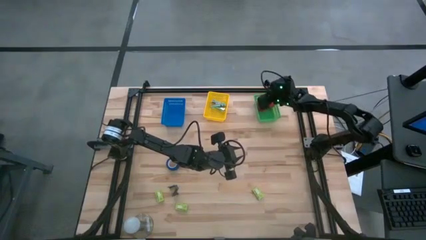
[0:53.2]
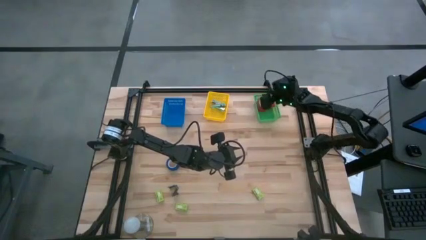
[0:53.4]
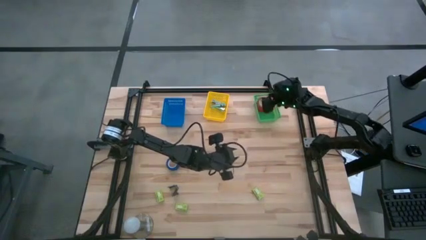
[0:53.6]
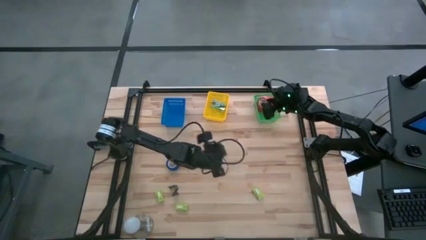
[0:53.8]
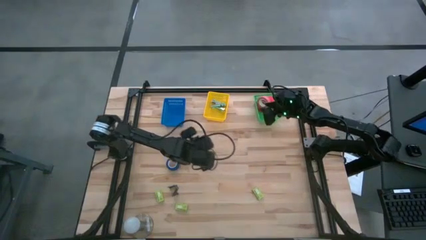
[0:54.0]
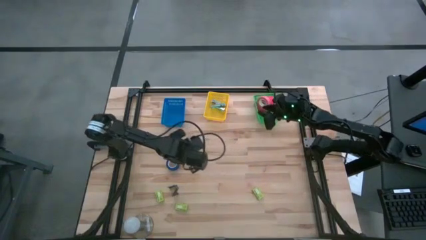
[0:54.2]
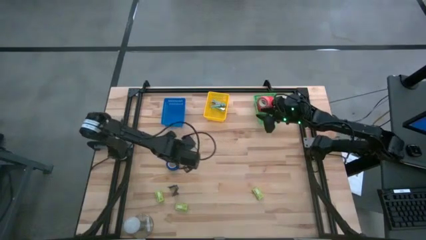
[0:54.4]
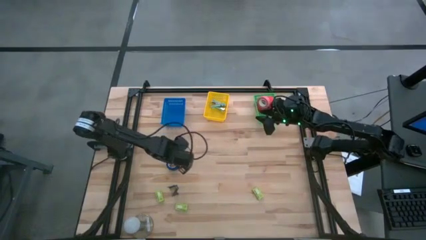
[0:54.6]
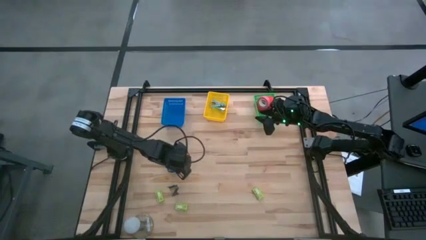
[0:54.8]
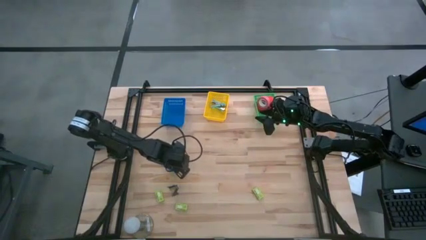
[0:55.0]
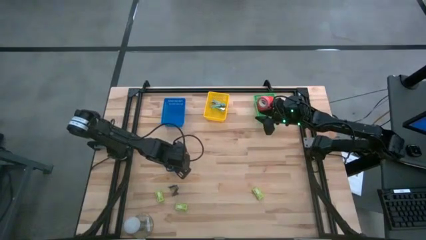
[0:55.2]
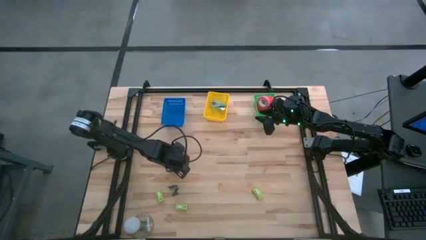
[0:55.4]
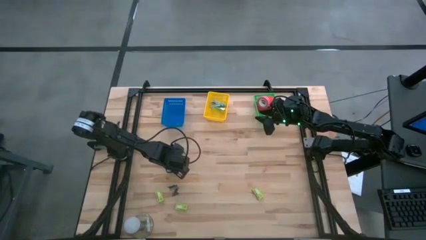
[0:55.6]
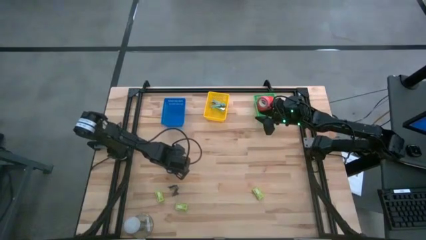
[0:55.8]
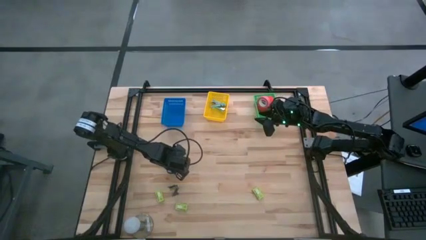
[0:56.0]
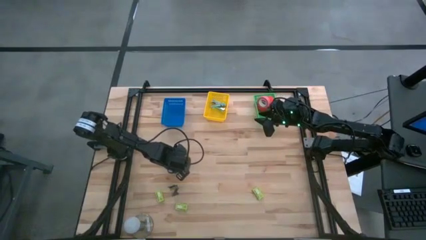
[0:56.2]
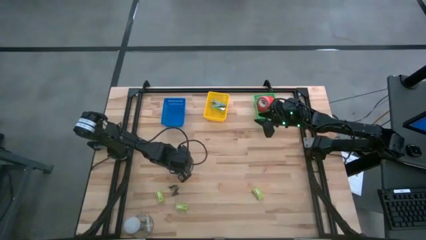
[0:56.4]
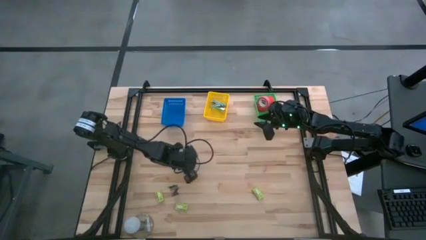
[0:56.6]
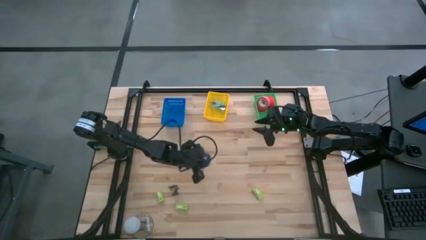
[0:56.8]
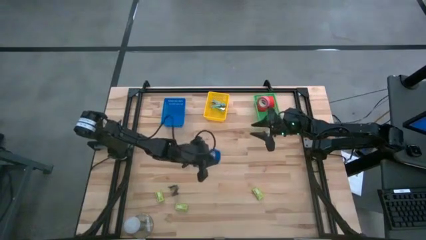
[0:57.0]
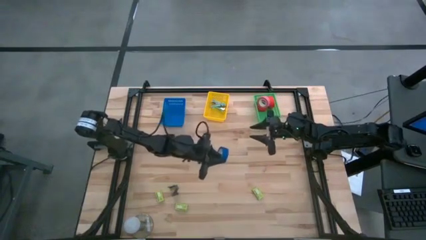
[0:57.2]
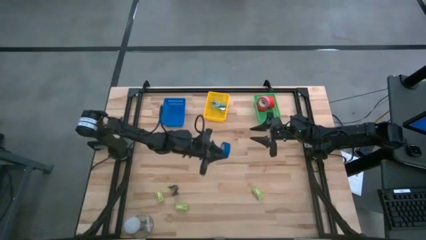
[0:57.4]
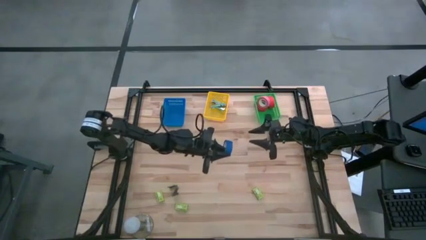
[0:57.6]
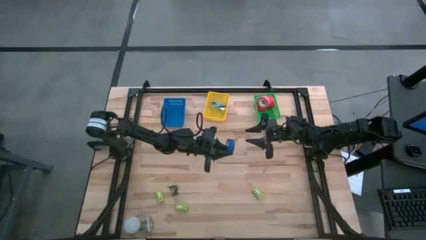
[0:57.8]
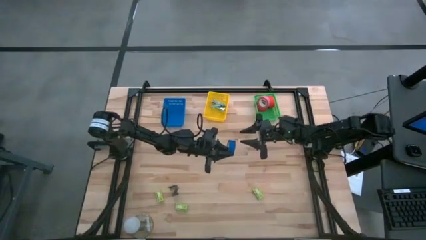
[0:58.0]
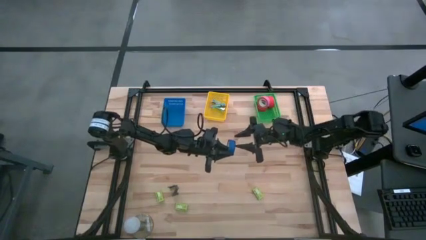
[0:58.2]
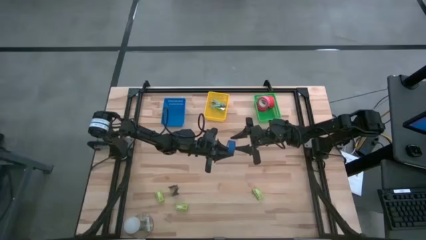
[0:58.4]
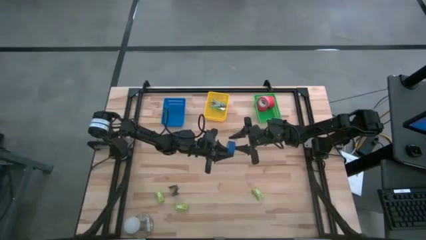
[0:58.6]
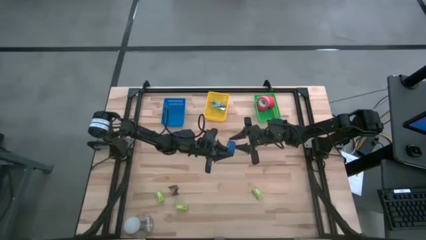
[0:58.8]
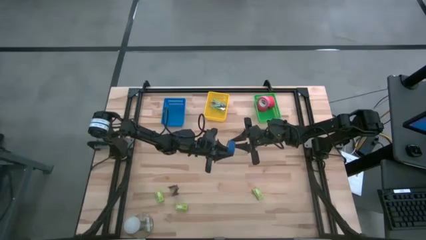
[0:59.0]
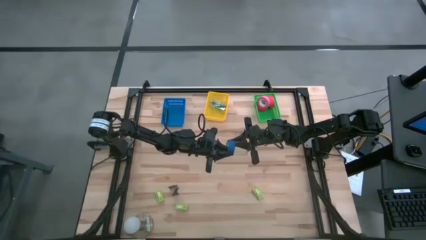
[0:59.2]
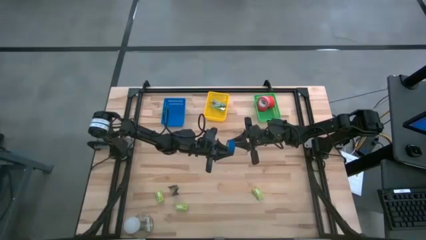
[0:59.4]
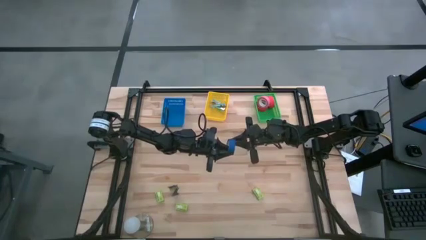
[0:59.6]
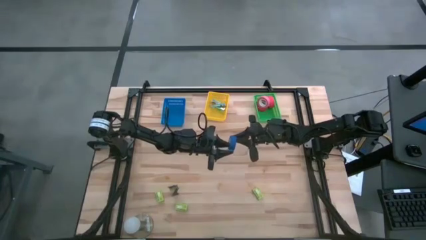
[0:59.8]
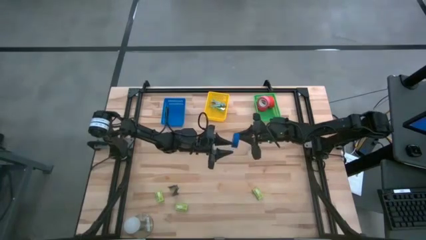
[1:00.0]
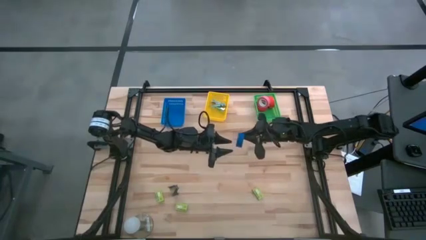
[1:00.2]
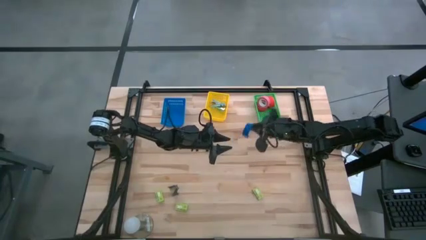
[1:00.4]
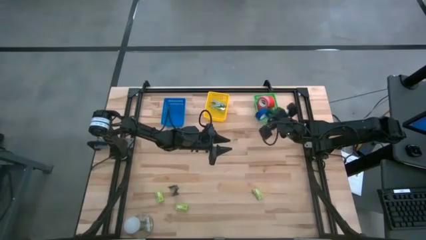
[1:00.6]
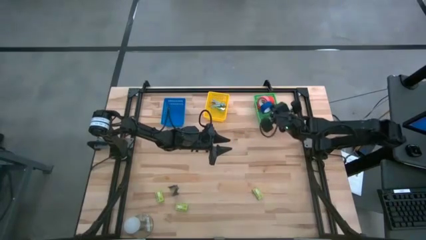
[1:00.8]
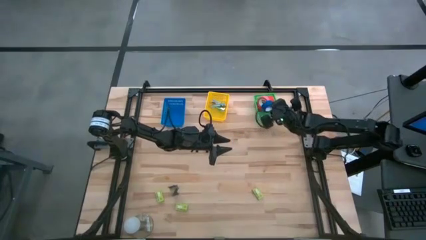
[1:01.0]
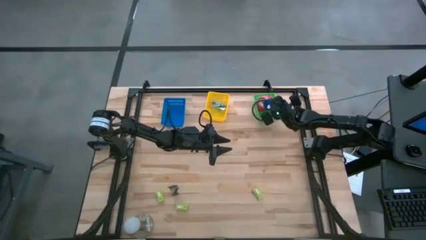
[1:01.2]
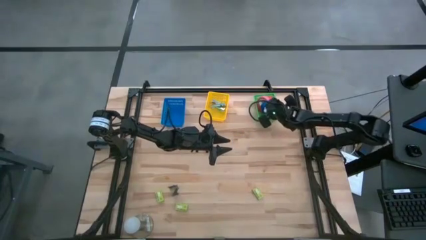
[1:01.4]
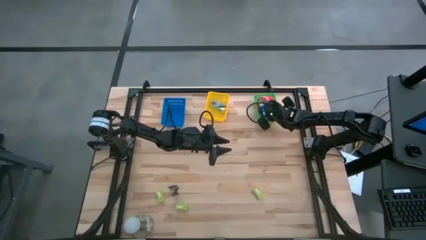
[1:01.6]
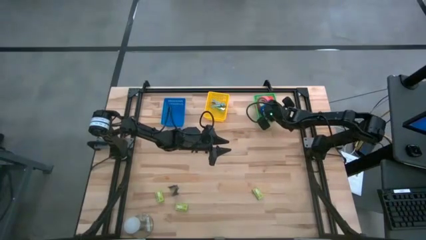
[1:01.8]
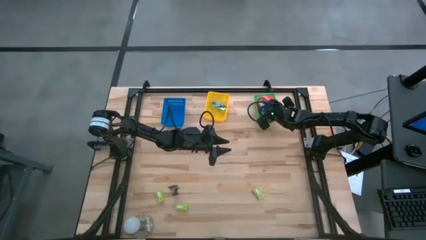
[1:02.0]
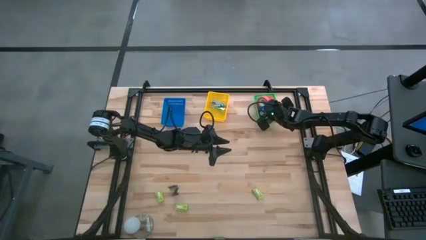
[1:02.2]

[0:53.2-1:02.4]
Task: Pick and place Stapler, Stapler remover, tape
Put the blue tape into the green bin

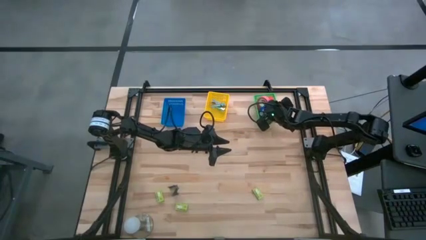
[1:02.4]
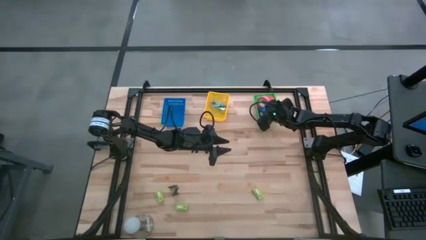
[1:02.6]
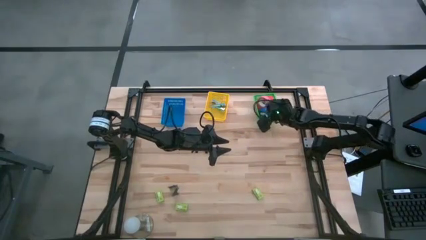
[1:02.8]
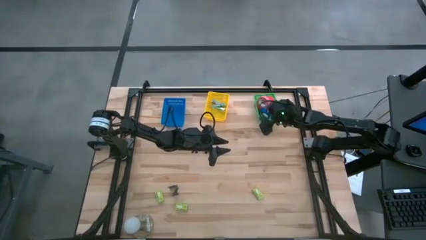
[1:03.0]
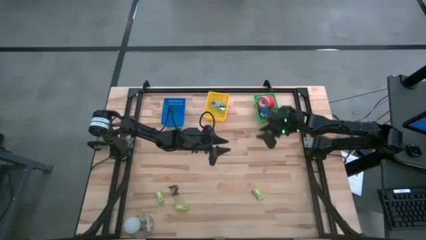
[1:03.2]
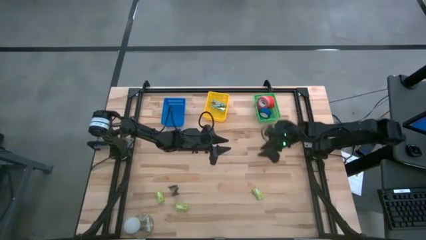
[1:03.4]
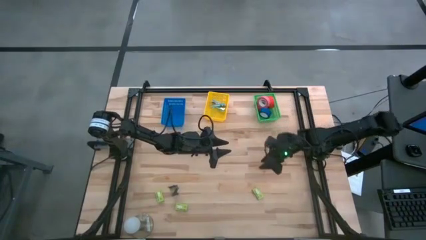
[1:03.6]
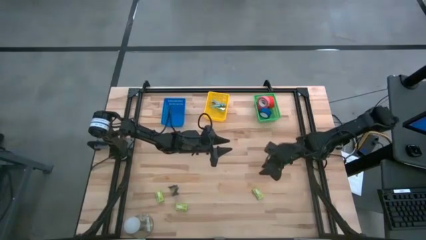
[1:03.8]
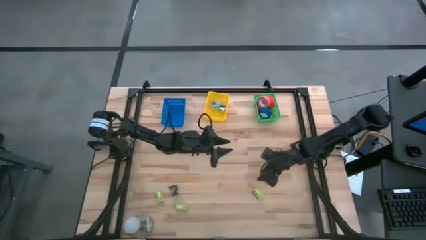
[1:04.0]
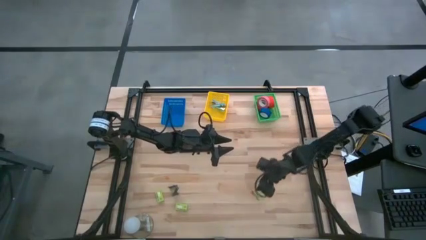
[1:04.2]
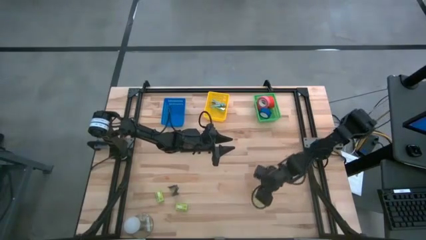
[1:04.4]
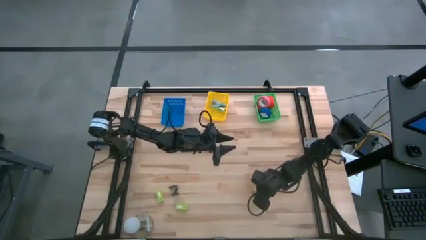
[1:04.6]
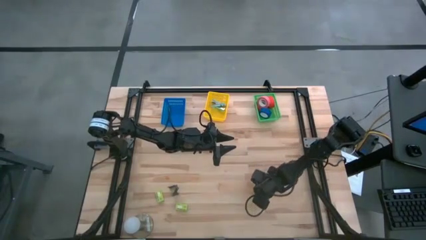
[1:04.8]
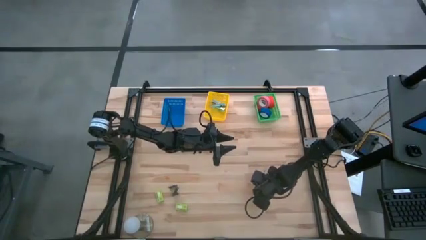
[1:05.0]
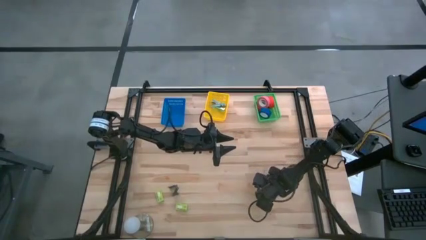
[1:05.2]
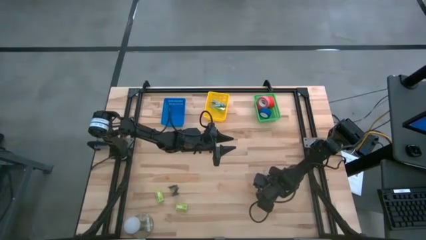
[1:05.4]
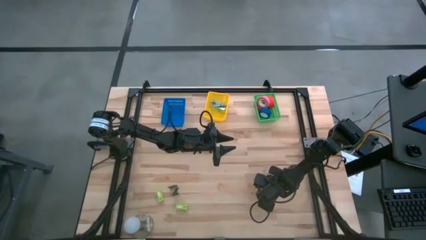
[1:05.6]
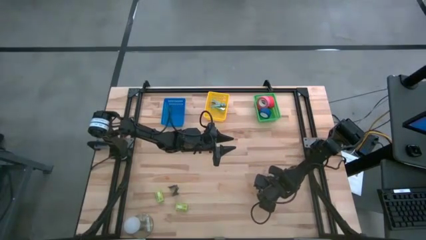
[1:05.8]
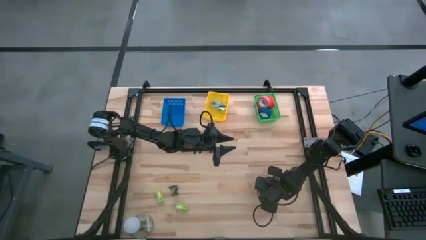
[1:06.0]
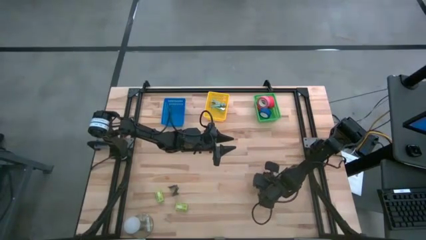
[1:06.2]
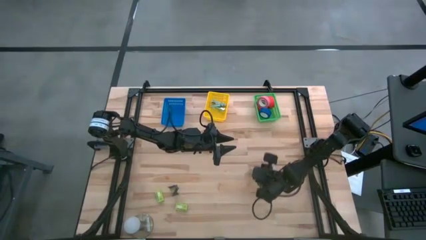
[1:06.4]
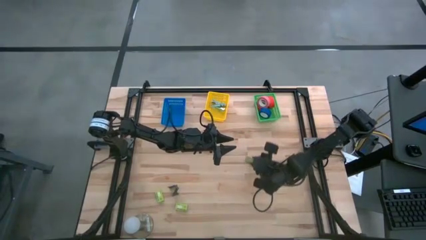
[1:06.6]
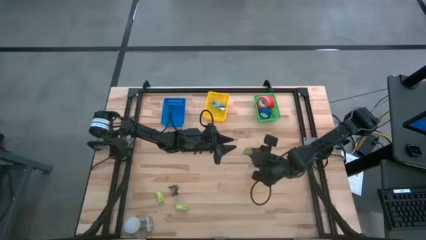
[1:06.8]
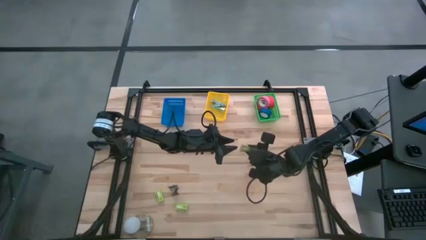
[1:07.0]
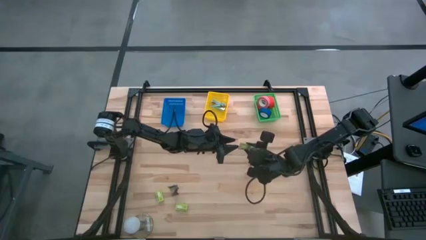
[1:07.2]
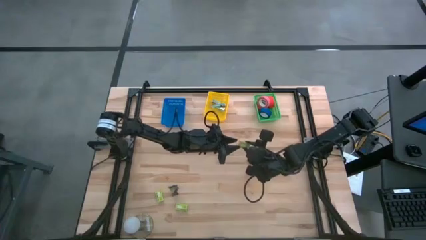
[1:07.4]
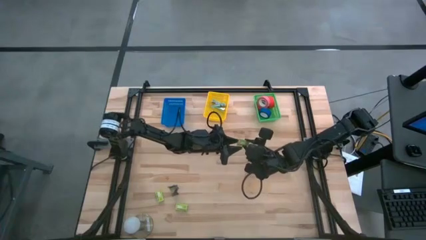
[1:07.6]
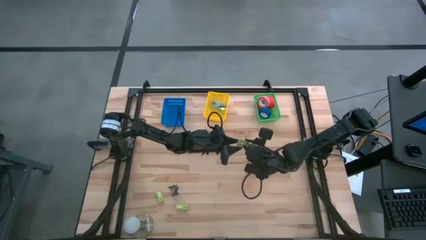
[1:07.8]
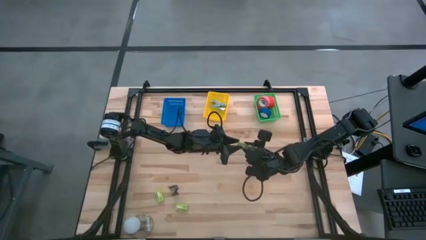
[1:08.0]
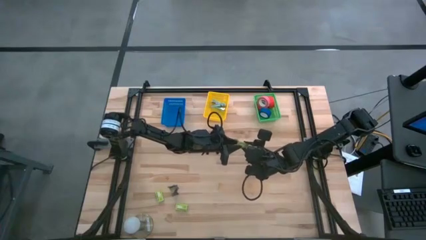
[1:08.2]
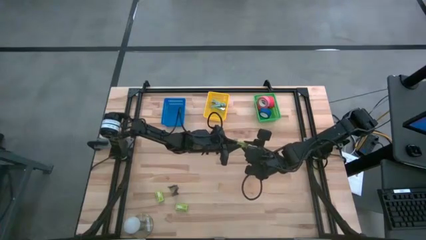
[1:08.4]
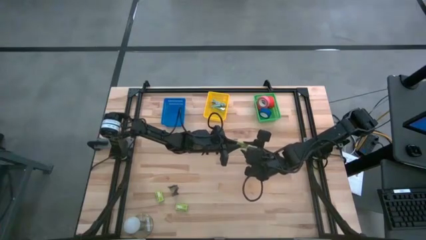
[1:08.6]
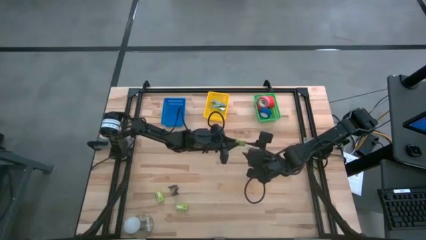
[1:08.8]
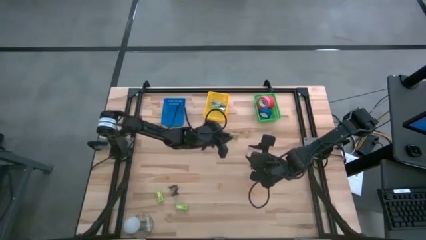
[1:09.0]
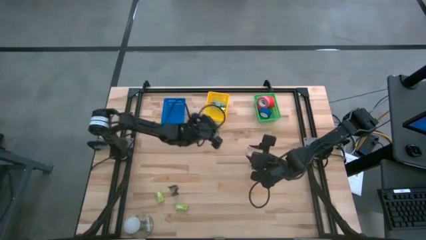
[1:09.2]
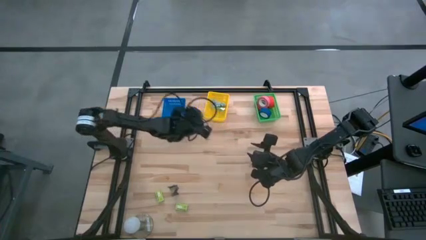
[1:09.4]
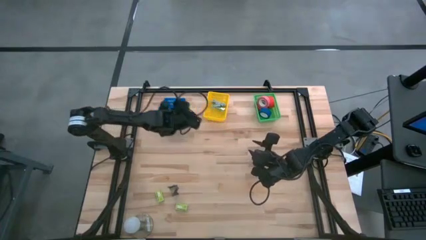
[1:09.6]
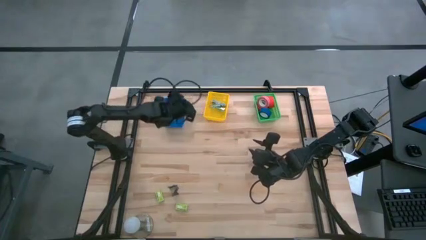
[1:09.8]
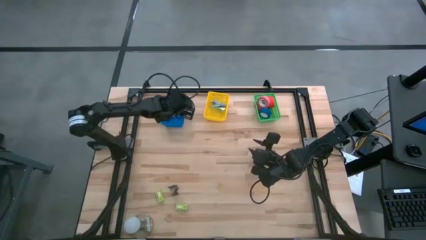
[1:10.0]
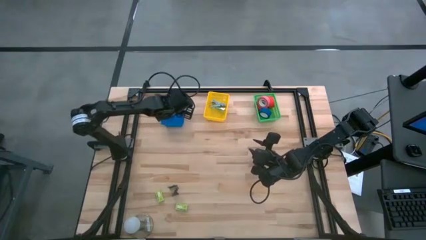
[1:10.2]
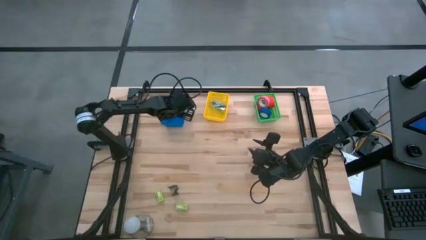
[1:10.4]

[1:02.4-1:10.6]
Put the green staple box into the blue bin
